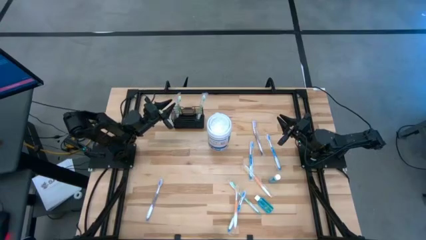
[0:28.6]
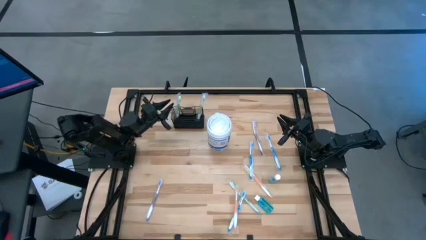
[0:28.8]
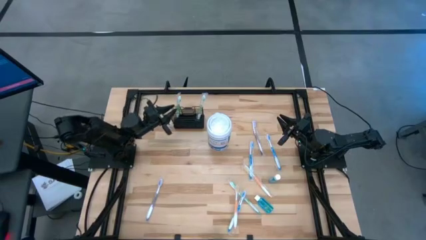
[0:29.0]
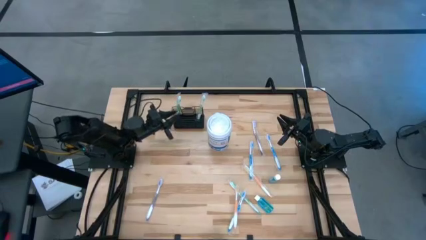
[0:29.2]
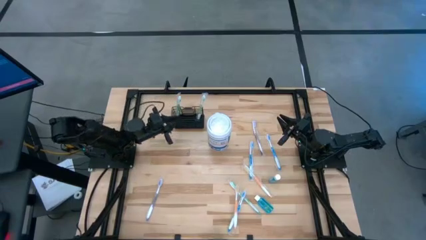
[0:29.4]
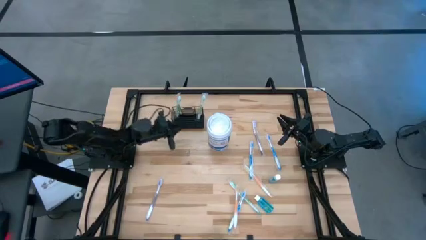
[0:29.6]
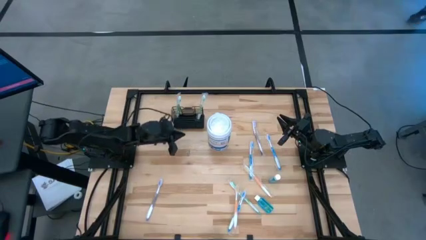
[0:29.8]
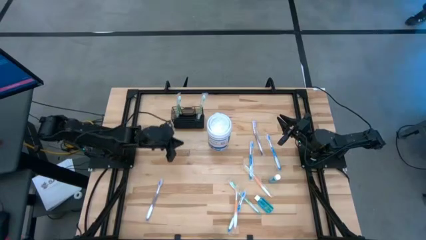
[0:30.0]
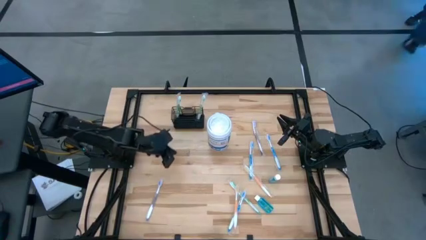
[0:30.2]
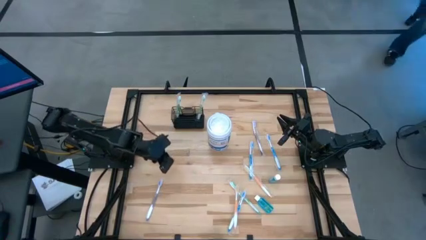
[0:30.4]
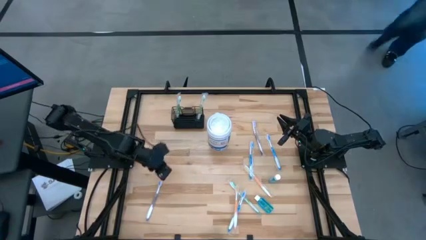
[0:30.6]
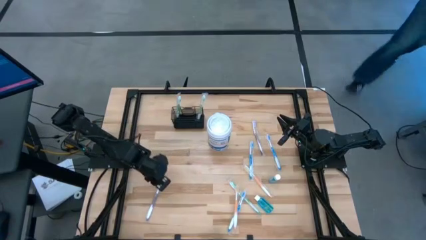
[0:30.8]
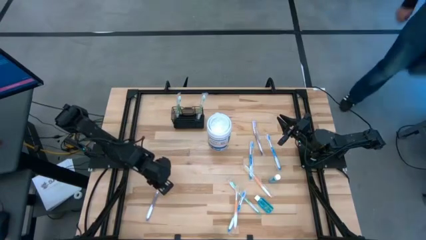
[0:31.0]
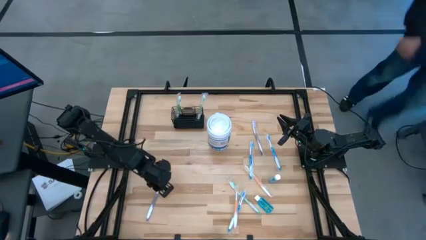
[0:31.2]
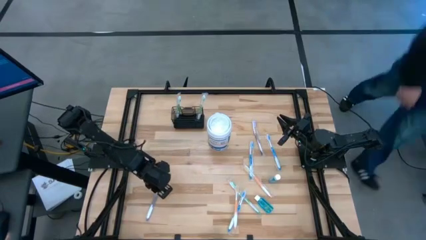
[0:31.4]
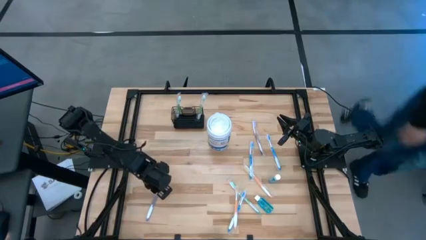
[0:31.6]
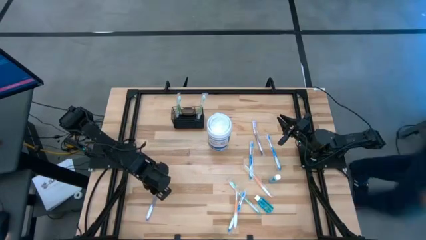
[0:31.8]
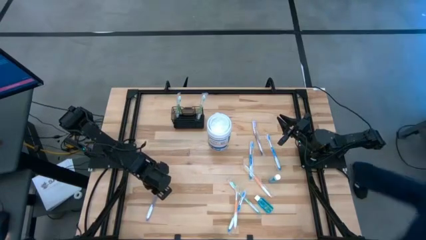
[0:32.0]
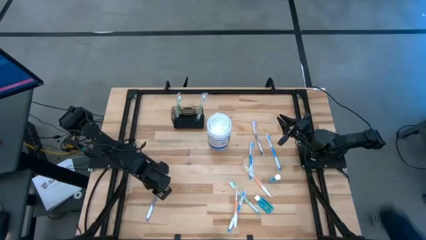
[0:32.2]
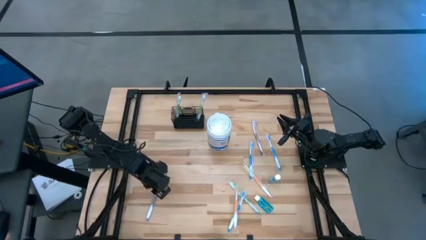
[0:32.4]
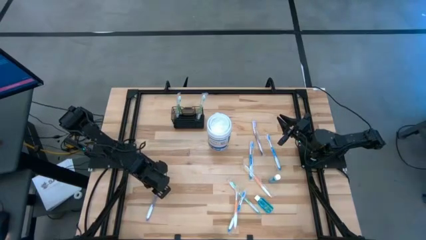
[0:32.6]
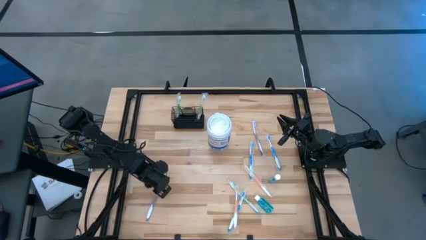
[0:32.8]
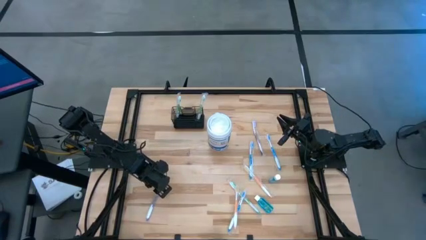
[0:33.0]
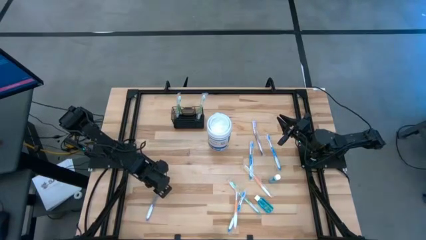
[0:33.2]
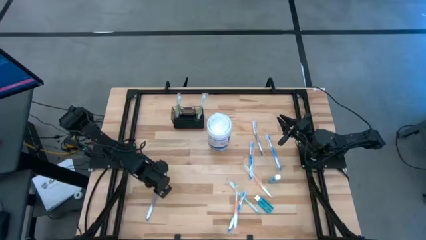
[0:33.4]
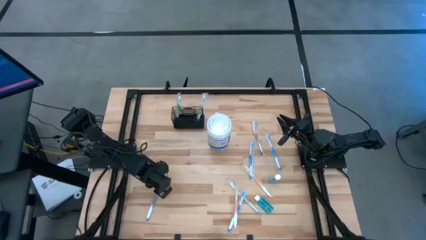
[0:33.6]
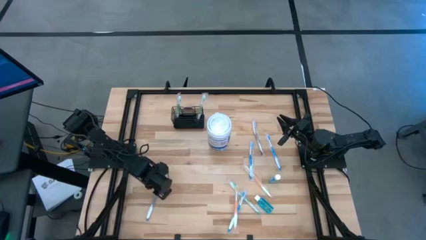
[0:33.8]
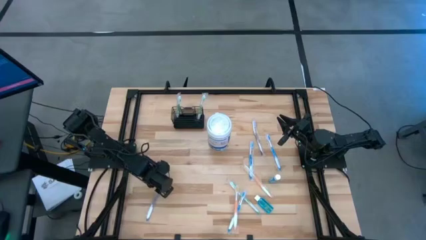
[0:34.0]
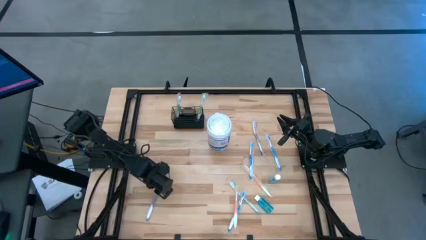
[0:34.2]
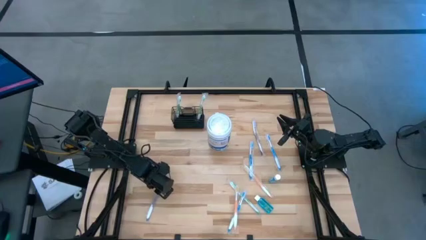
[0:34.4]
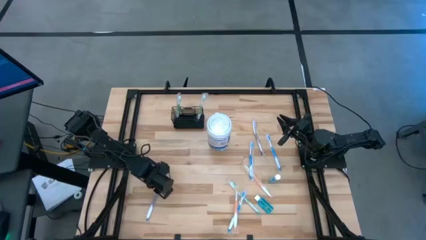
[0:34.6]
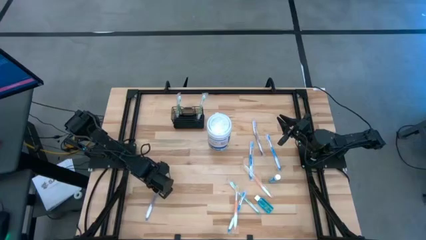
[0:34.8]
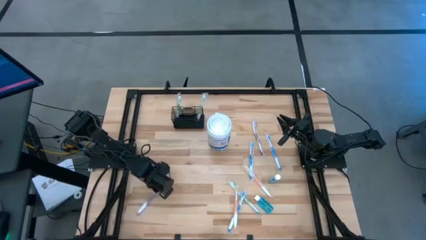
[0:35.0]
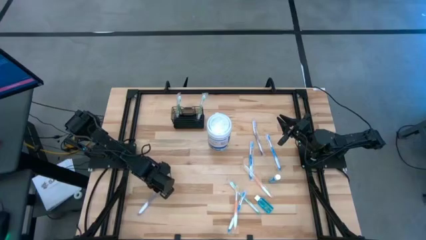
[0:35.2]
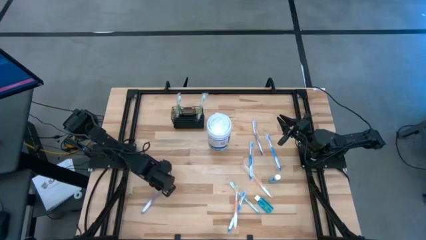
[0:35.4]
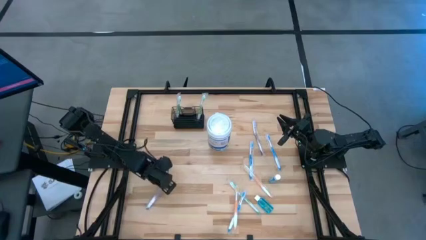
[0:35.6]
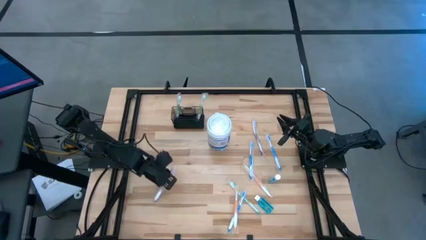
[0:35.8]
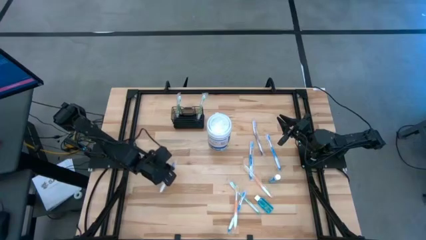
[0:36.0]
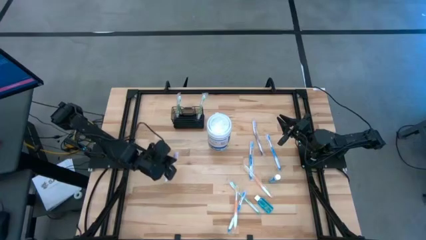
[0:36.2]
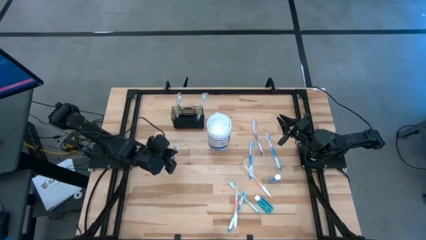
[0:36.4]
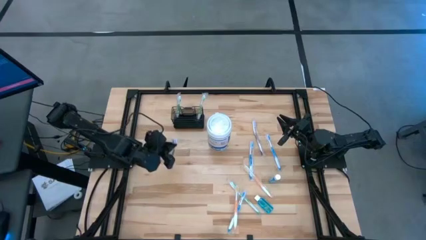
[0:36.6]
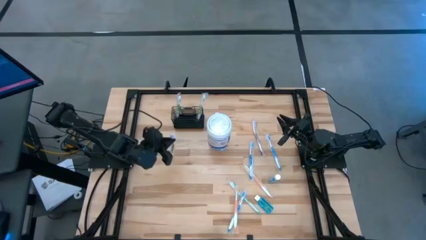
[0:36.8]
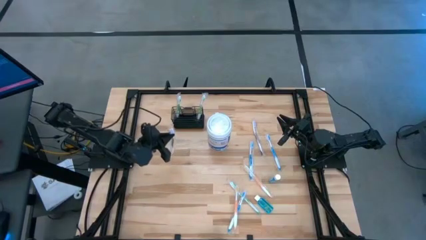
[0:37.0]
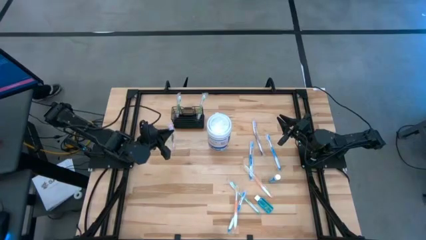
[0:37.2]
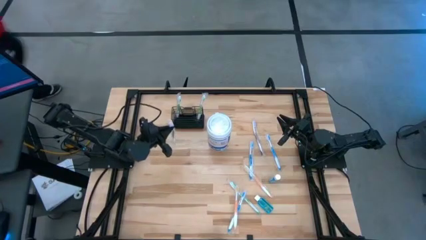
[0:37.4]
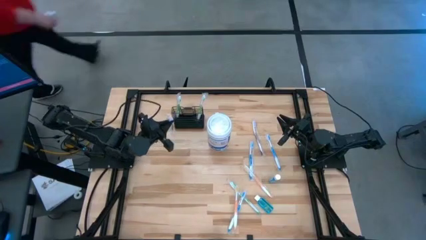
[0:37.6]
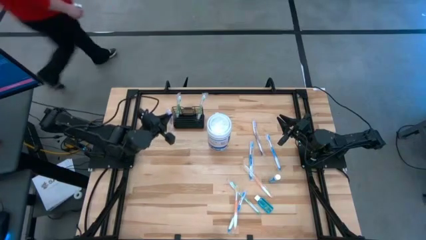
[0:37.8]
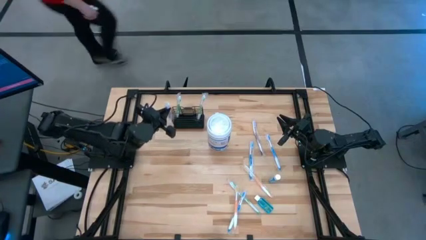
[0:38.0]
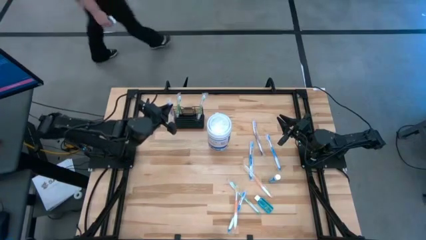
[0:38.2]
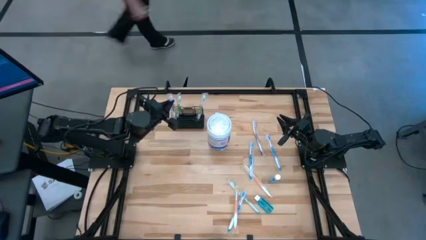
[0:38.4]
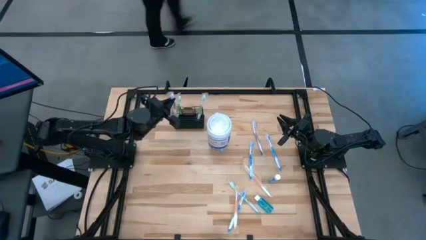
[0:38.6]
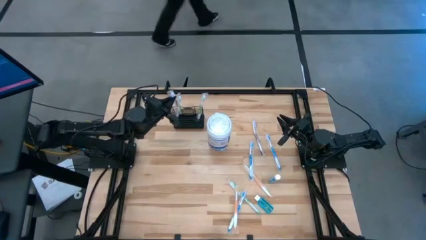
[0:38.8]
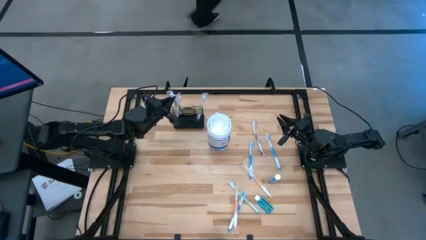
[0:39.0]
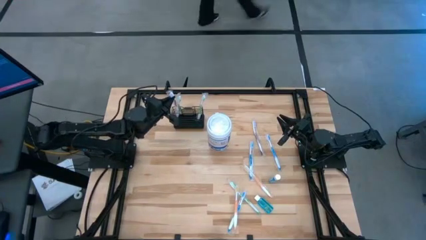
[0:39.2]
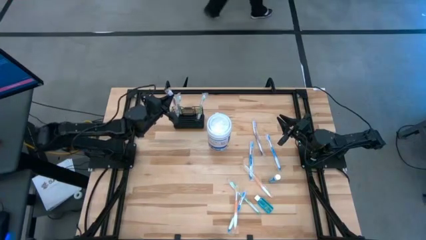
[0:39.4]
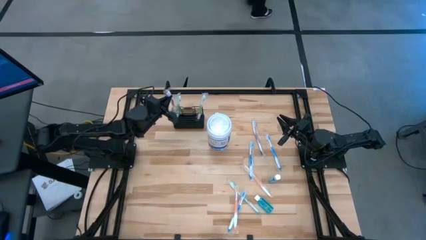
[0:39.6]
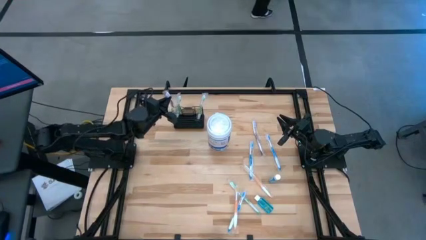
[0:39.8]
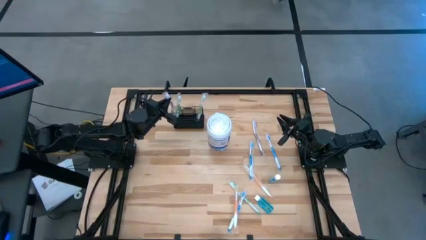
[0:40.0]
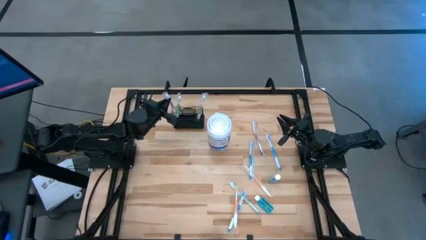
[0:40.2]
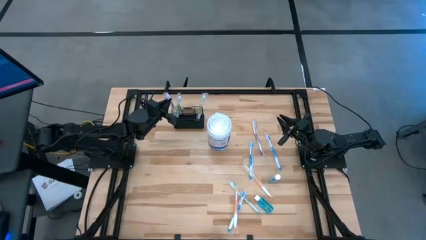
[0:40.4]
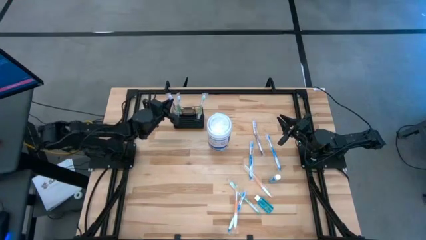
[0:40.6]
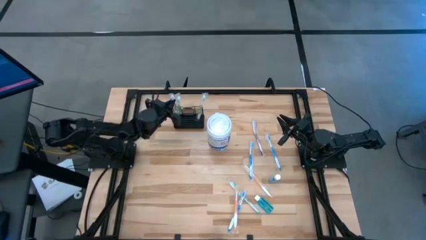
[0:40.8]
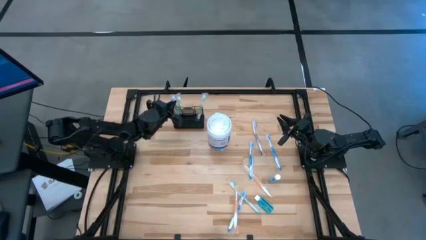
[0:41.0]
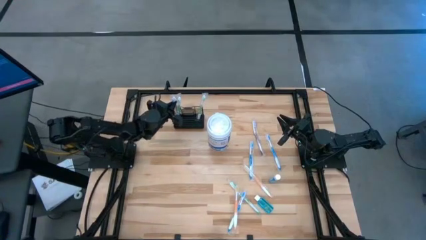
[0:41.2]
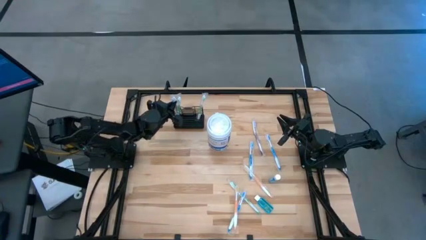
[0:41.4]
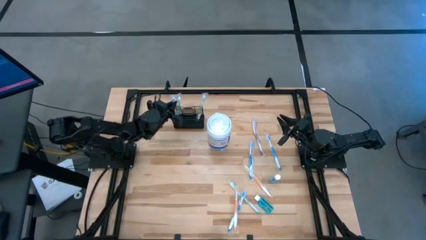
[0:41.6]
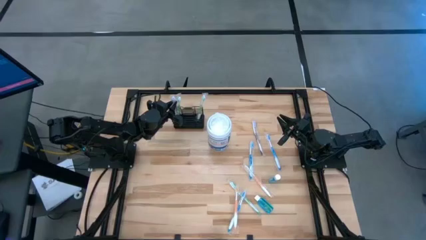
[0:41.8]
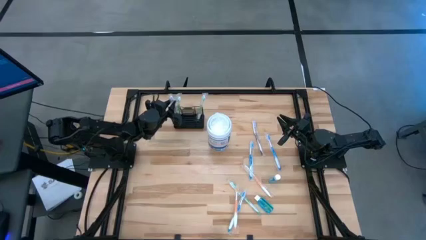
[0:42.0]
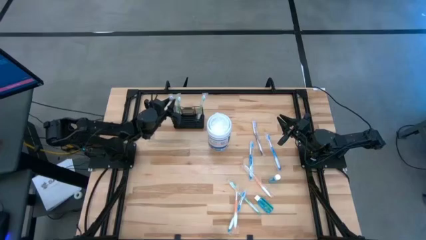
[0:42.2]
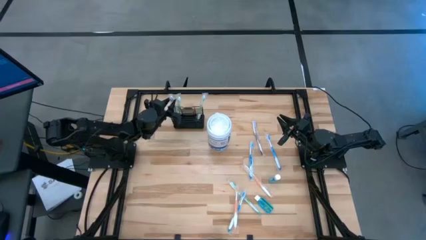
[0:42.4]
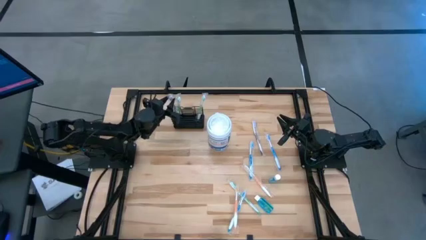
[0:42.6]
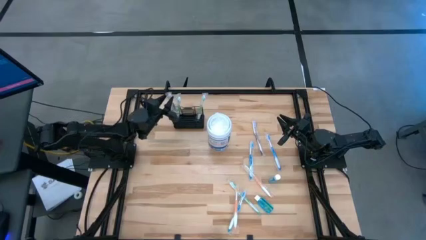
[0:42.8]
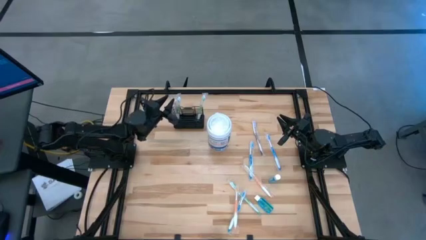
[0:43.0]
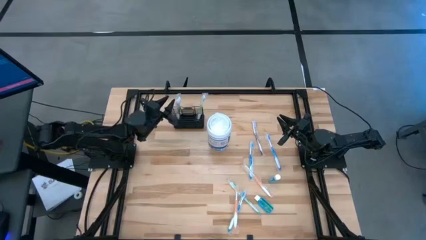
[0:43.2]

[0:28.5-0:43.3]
Task: Pick & Place toothbrushing station
Put the bottom purple toothbrush into the mesh organizer

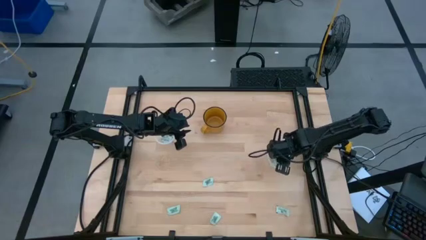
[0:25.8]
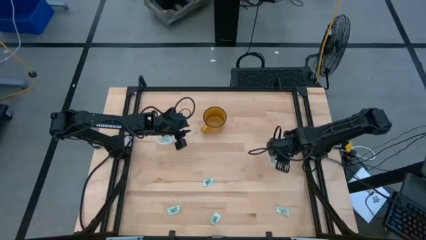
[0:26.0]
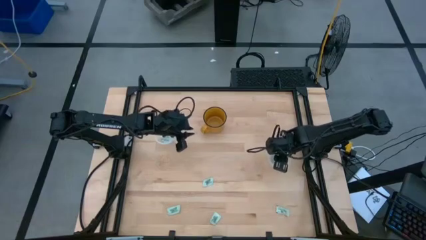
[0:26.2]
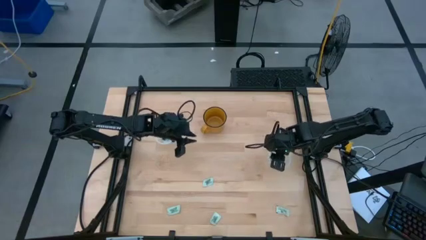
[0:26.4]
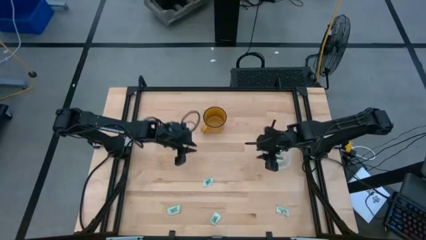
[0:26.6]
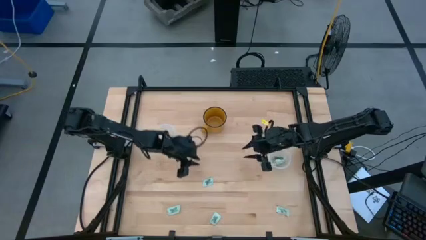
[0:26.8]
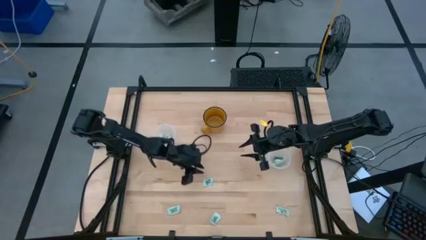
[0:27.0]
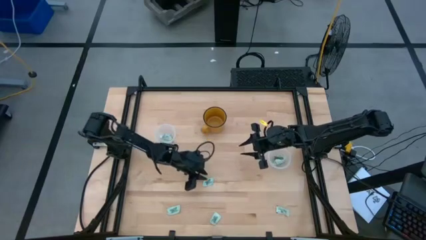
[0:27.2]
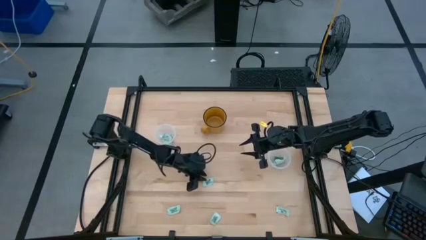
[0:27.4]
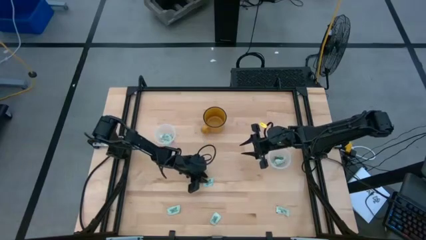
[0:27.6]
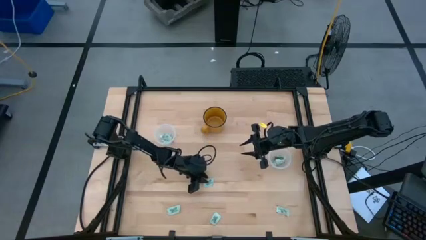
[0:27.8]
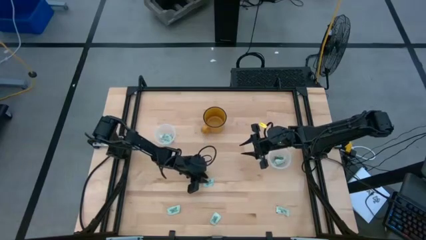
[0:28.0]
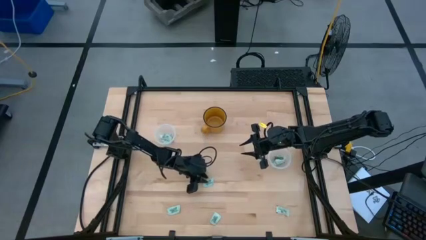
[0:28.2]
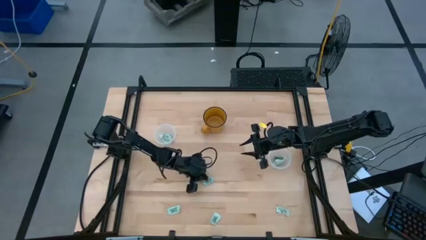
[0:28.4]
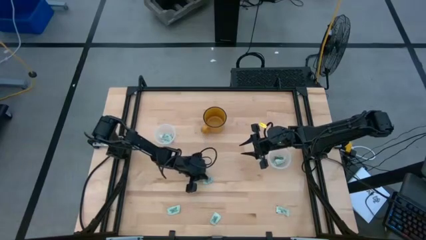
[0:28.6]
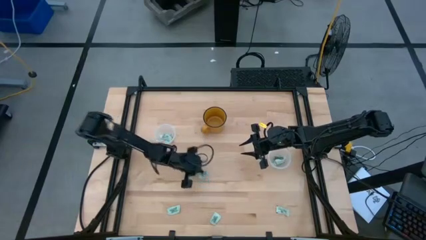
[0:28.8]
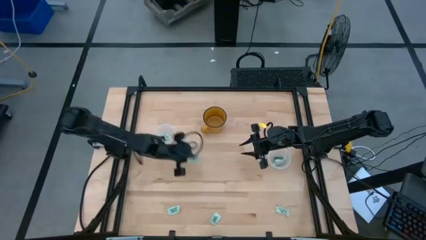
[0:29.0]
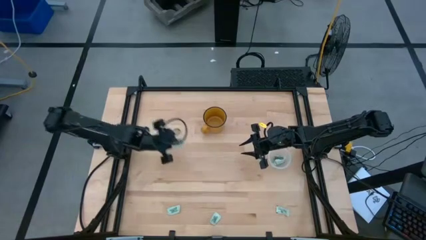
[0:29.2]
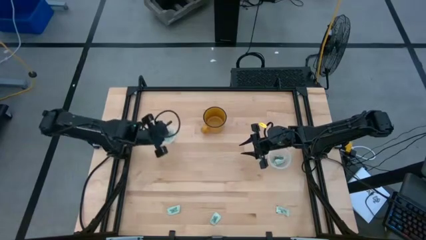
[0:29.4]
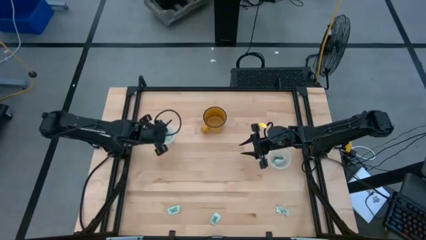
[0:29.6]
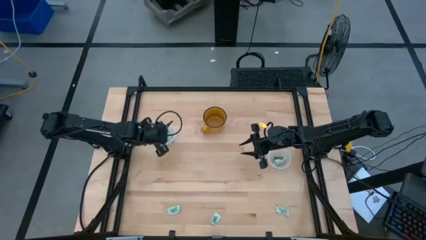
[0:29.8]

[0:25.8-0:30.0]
Task: Pick and place Stevia / Truvia into bins
Put the light green stevia packet into the left transparent container
